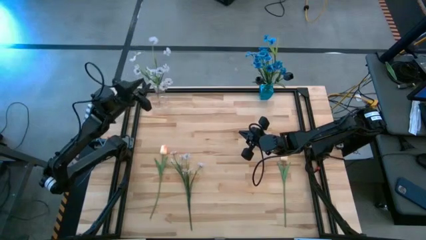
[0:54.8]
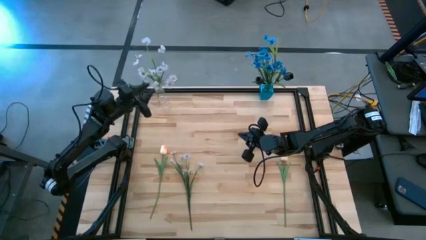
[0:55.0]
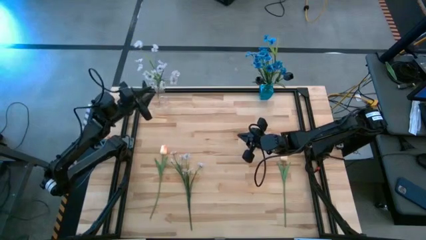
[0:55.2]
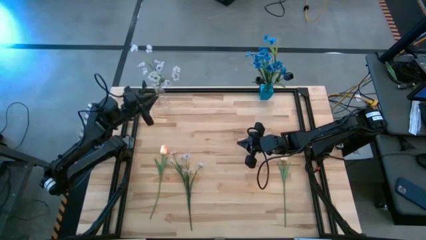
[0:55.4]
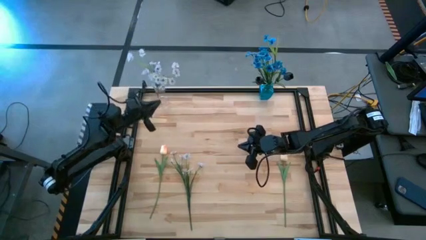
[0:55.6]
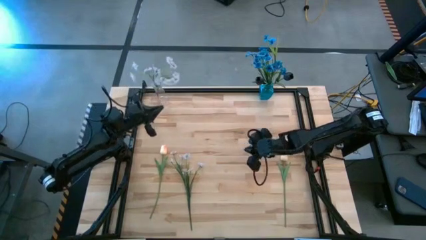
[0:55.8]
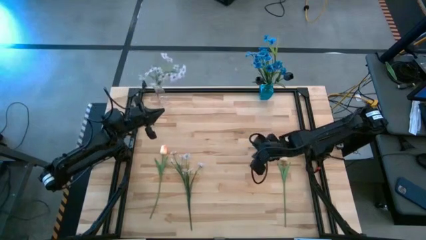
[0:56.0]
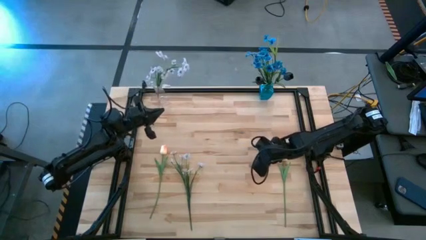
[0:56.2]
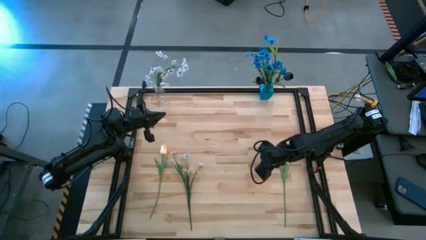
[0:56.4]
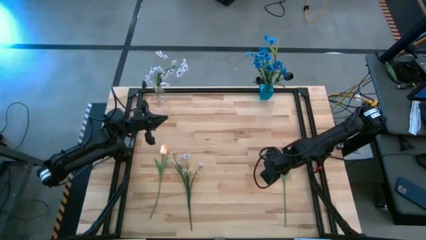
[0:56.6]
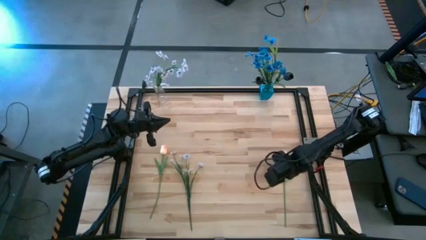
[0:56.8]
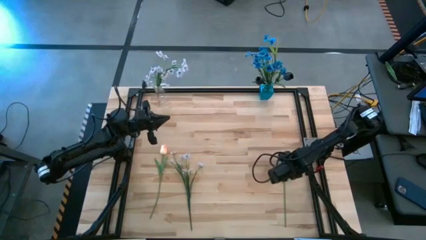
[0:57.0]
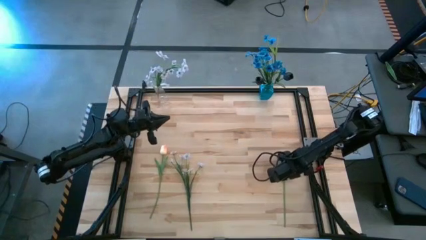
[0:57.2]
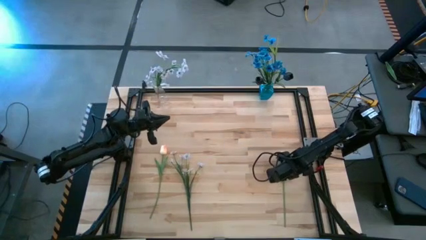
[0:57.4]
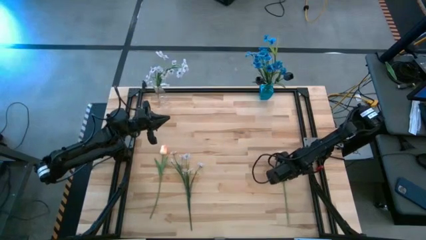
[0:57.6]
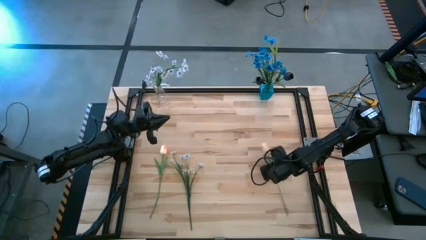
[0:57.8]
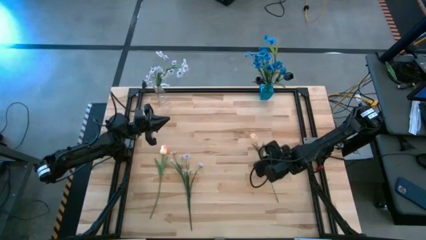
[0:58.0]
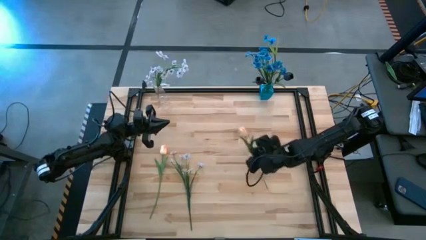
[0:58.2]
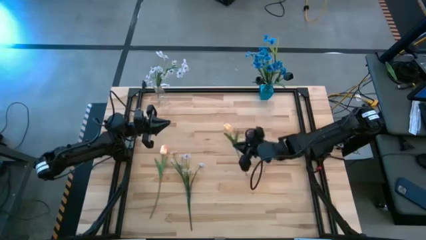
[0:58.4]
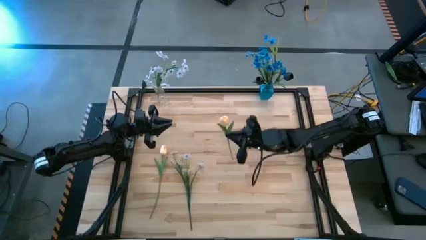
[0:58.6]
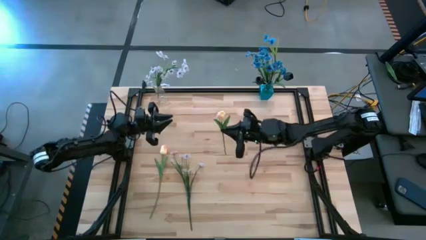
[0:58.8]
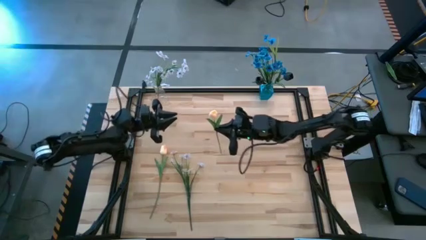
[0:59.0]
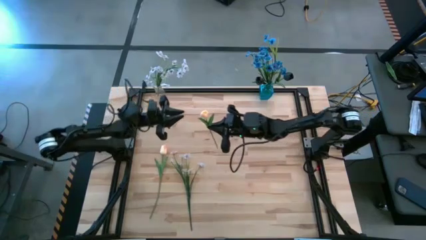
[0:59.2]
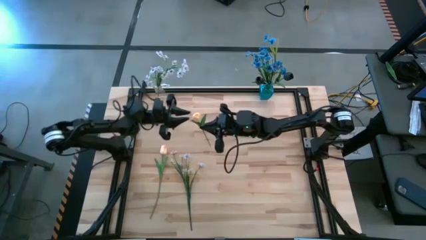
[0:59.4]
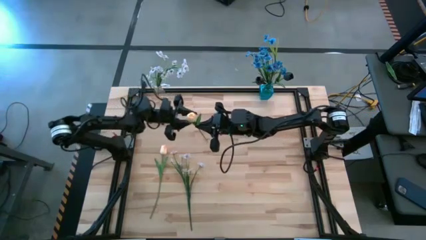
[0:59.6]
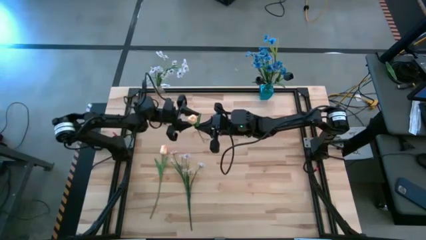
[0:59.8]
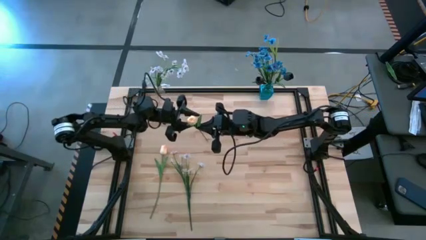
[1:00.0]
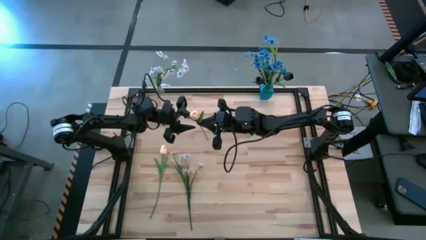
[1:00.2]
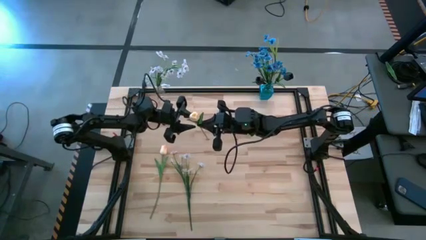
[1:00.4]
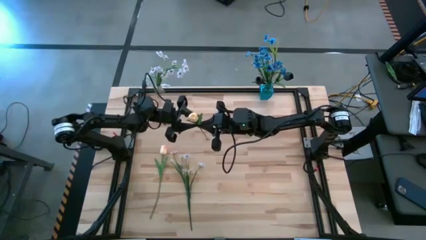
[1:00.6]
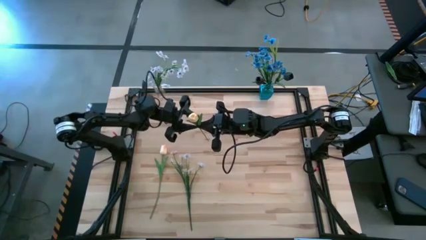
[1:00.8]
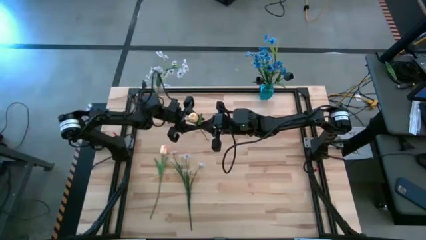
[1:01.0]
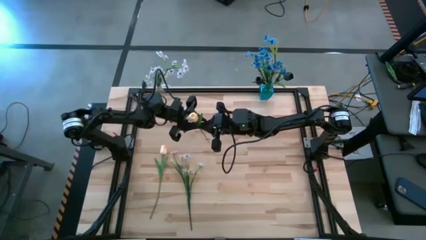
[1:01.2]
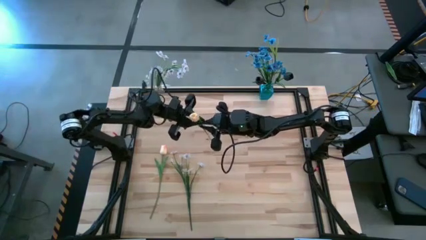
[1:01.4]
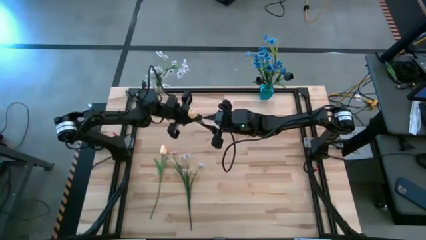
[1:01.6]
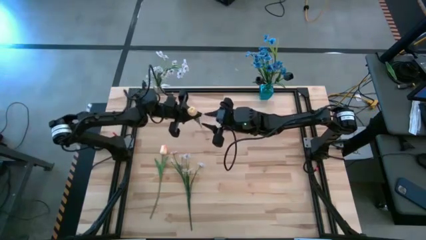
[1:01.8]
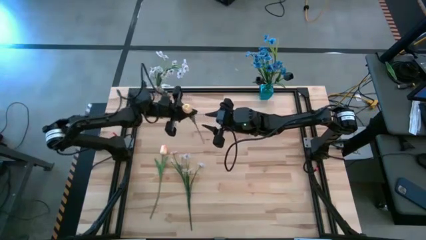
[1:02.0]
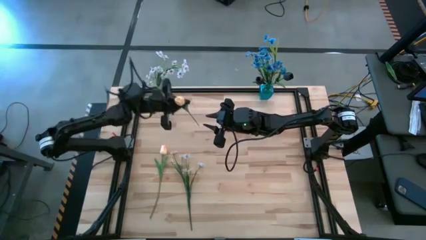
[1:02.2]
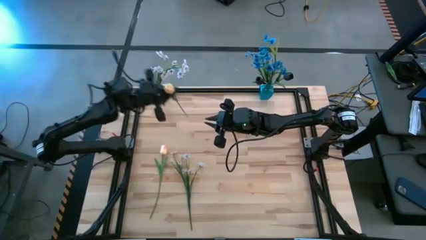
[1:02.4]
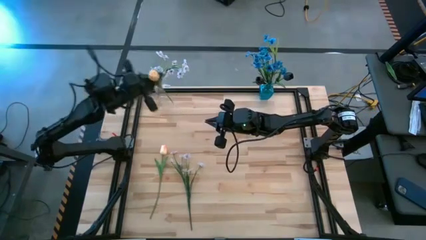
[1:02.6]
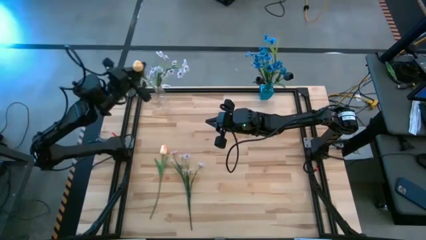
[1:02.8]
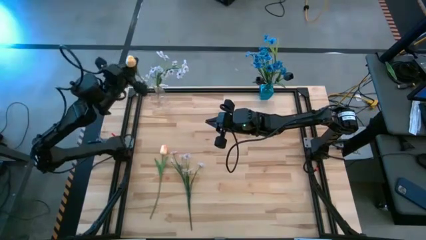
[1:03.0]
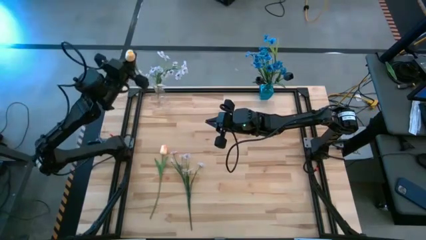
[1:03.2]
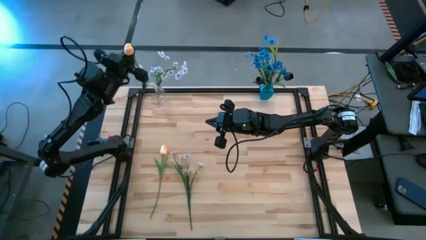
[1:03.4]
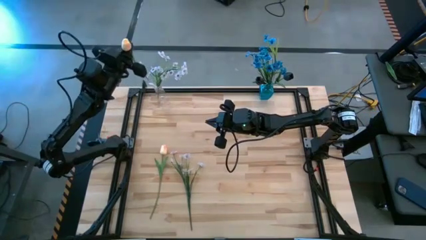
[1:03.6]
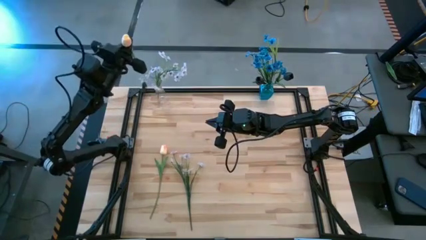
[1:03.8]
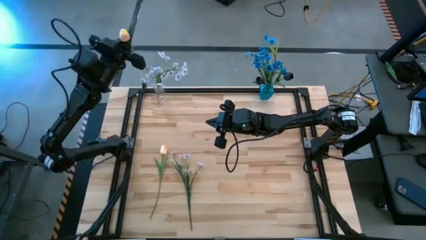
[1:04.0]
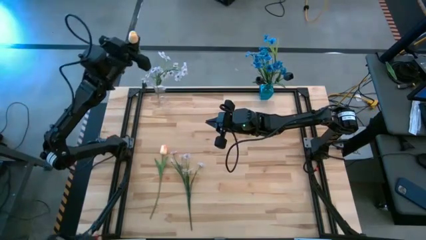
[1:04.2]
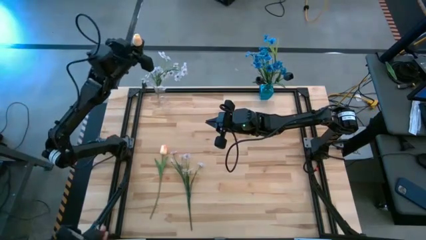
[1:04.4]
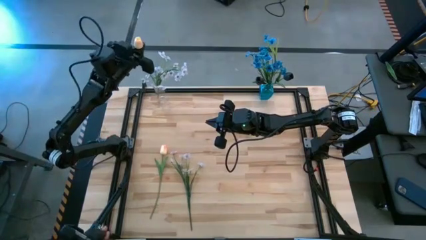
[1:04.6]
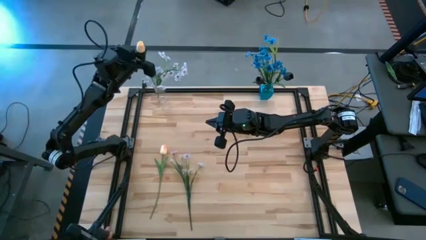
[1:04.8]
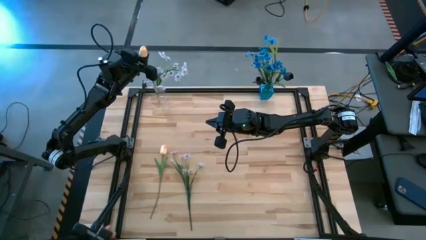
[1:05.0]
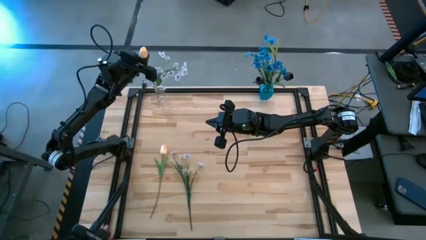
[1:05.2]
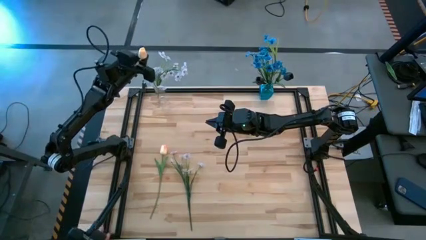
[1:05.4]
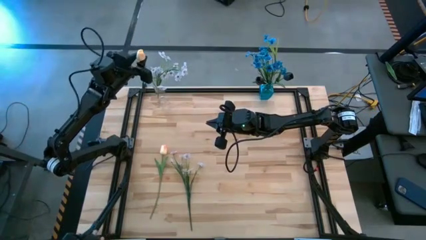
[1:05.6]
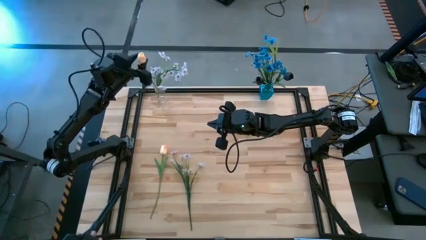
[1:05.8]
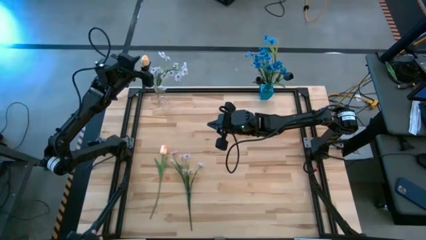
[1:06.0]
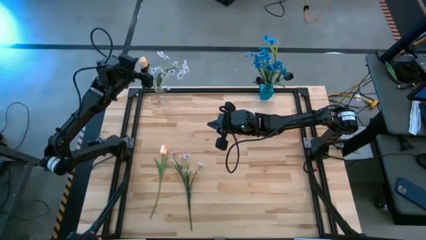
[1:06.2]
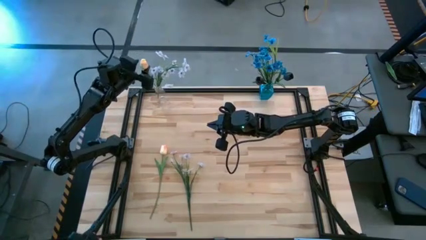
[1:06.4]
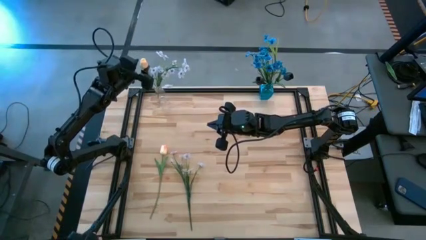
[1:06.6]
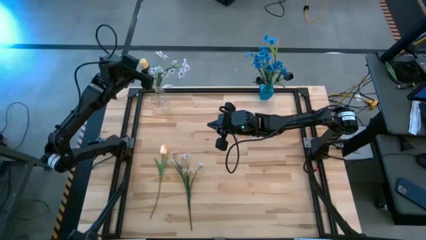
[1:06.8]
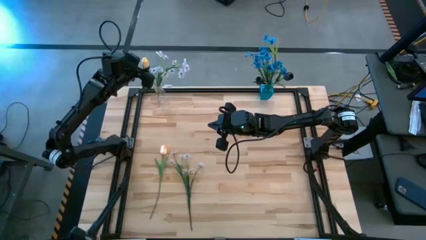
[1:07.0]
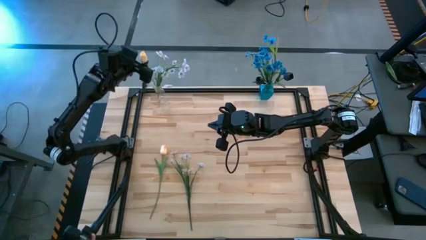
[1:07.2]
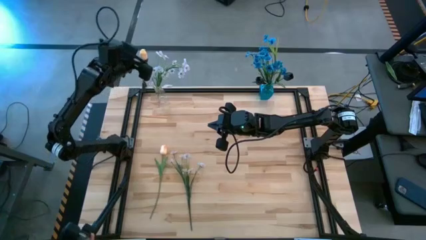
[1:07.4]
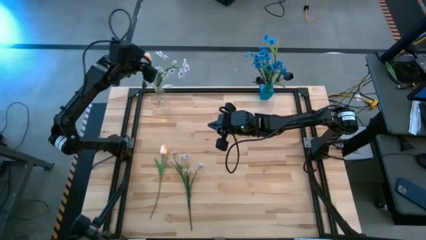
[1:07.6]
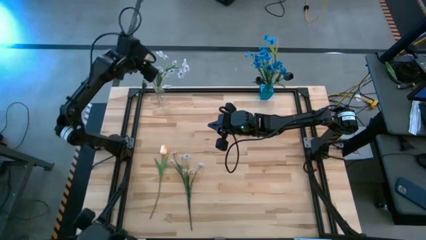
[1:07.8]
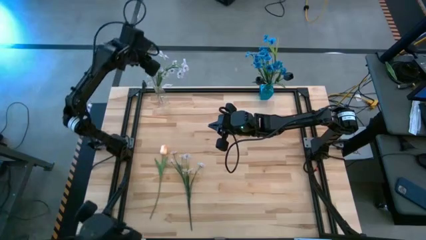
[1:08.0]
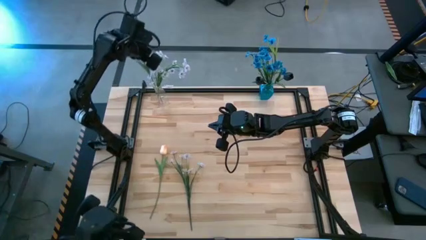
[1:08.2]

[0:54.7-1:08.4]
Task: Sort flowers into vase by color
Put the right yellow flower into the transparent vase

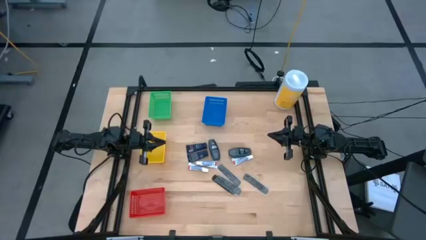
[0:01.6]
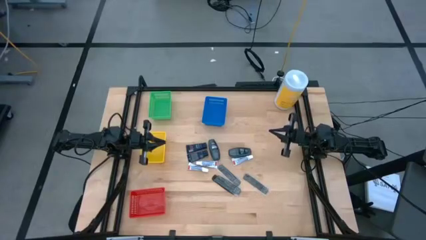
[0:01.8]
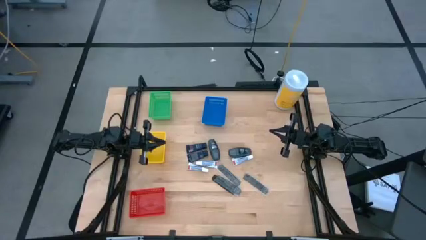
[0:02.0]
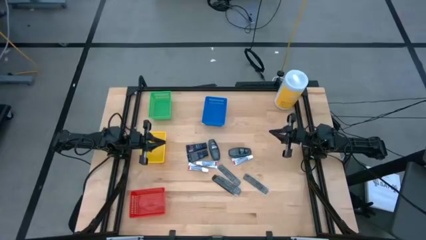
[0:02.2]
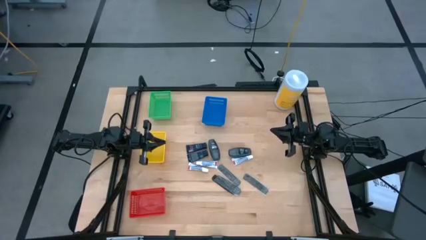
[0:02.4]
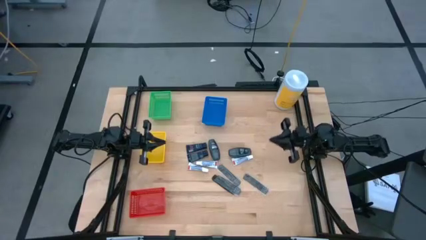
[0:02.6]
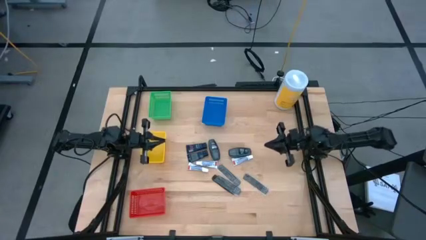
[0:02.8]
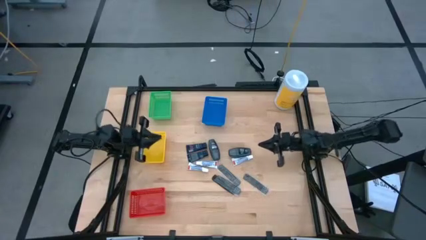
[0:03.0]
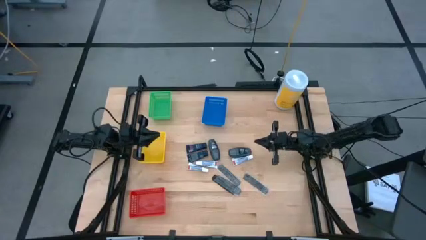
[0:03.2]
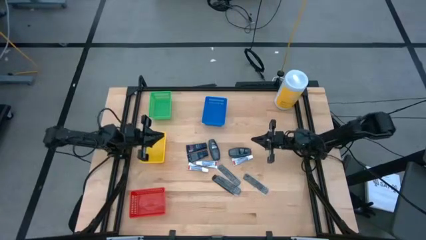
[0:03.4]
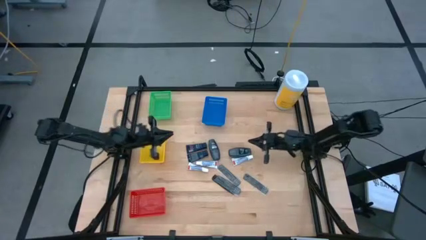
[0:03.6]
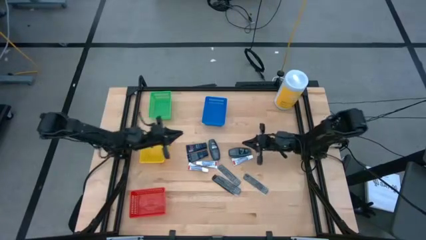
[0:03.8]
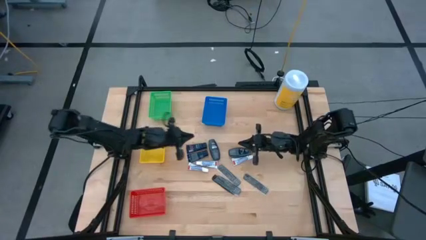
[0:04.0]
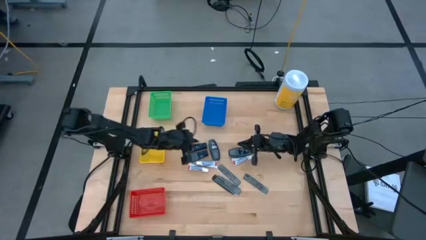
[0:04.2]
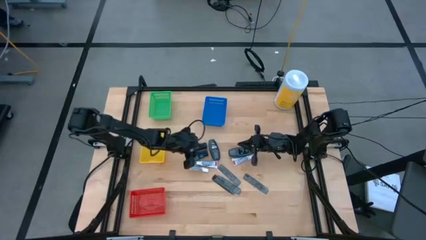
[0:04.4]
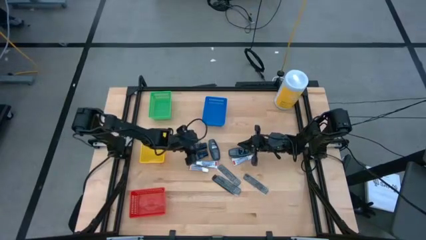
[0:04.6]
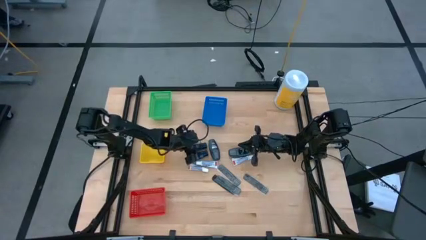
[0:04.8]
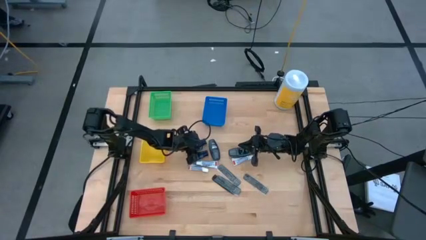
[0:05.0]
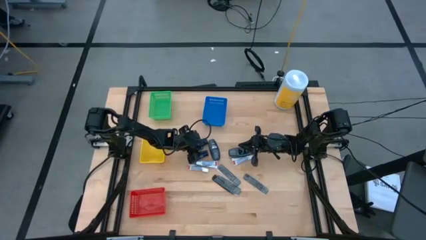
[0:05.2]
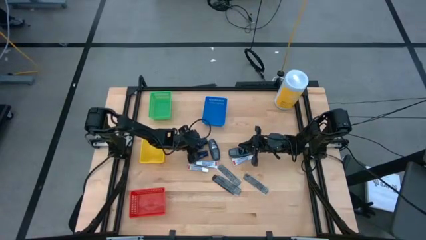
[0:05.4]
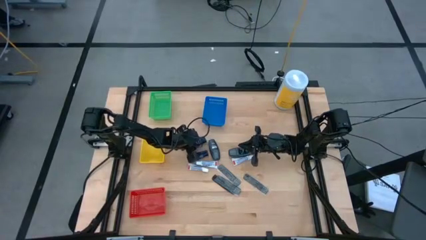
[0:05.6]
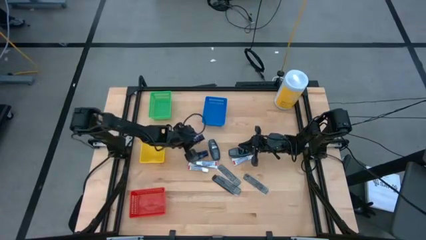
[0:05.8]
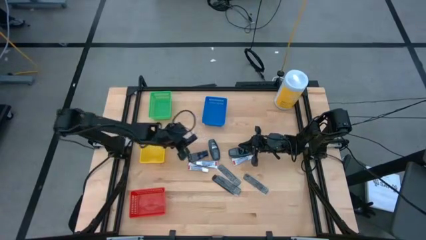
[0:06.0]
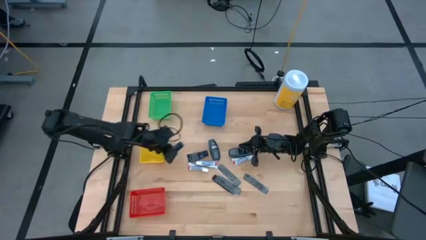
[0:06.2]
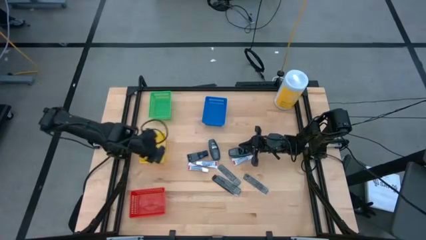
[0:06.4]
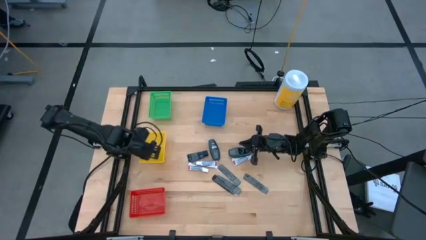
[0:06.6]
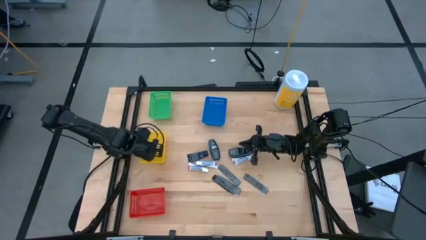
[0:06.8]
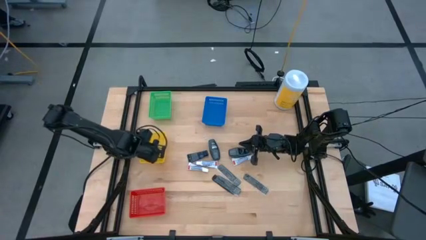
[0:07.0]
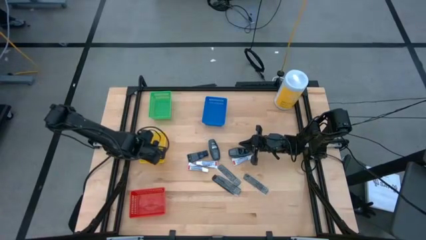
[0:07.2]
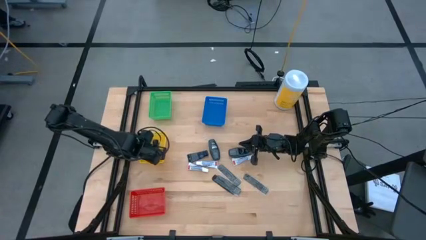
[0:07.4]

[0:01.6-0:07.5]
Task: Pick & Place Travel size toiletries
Put the blue shaving cream in the yellow basket
